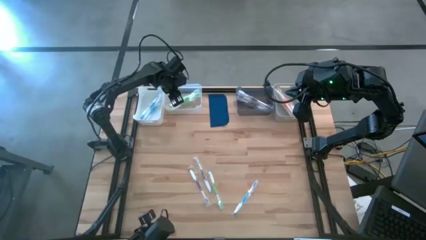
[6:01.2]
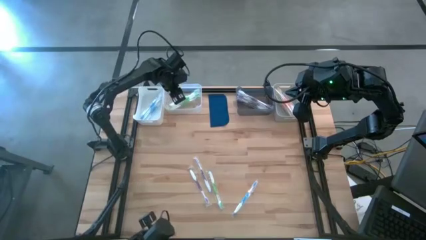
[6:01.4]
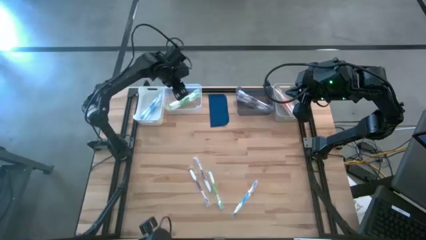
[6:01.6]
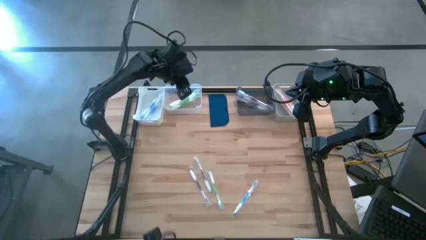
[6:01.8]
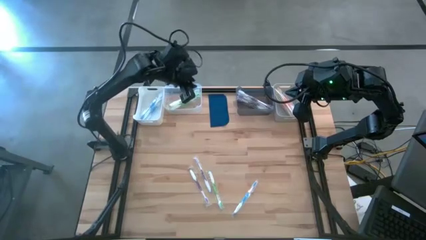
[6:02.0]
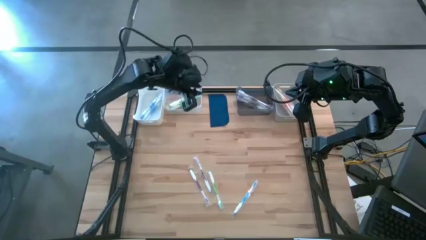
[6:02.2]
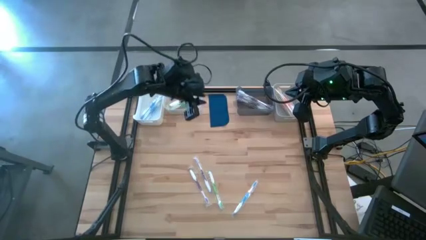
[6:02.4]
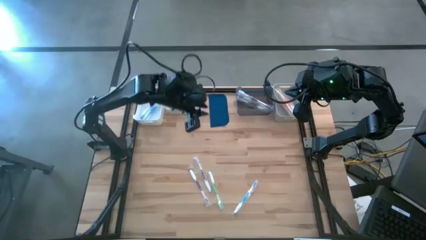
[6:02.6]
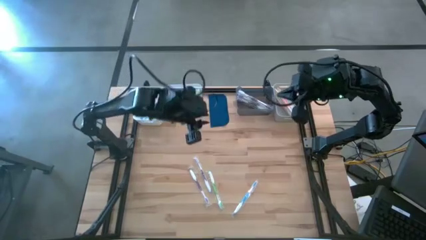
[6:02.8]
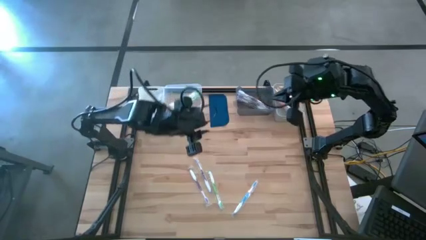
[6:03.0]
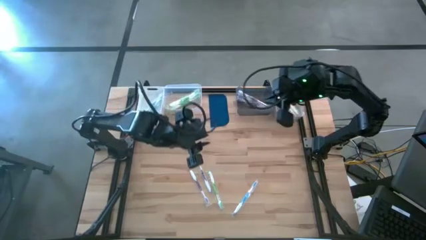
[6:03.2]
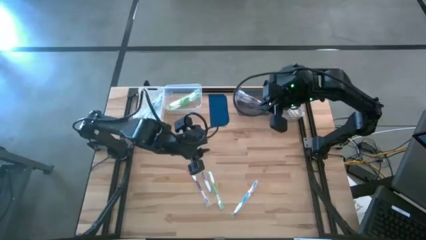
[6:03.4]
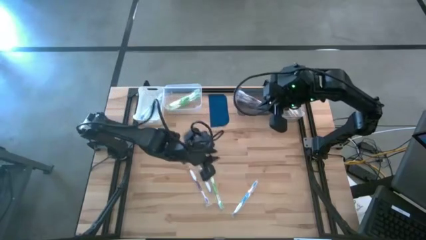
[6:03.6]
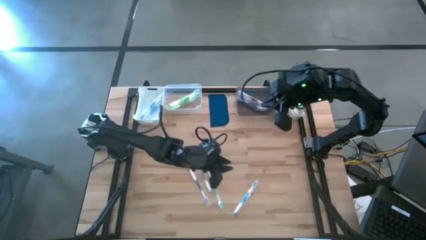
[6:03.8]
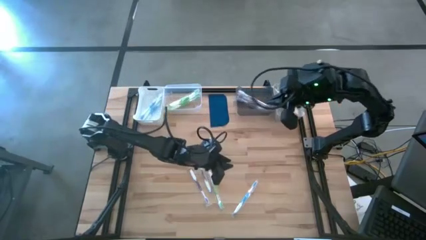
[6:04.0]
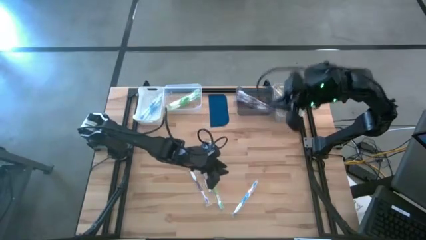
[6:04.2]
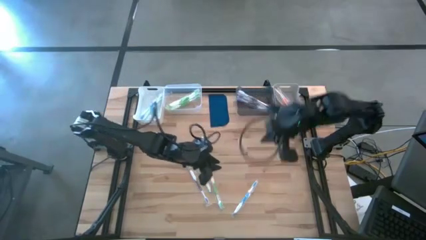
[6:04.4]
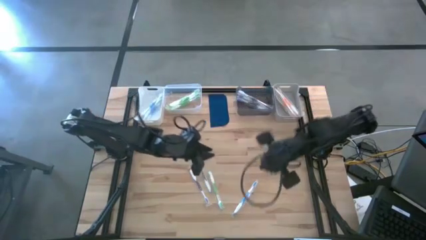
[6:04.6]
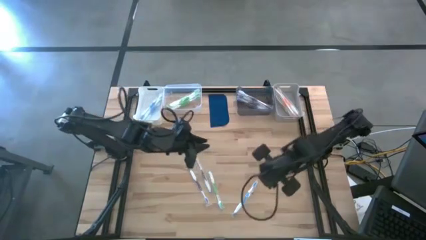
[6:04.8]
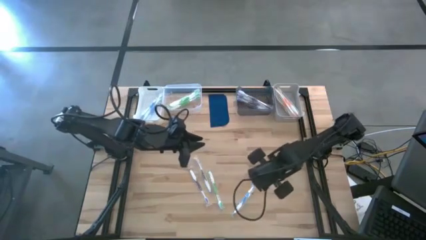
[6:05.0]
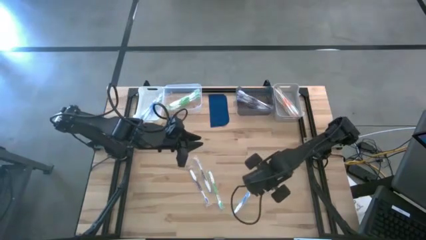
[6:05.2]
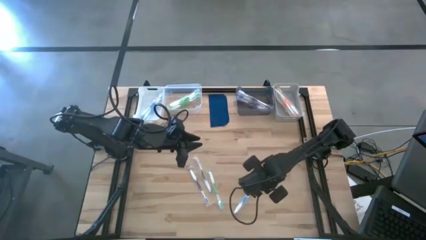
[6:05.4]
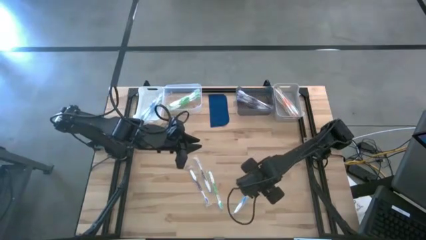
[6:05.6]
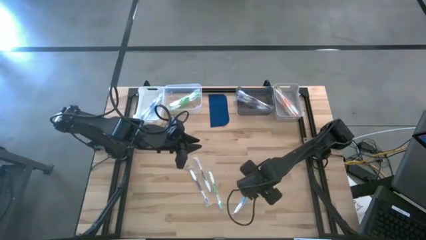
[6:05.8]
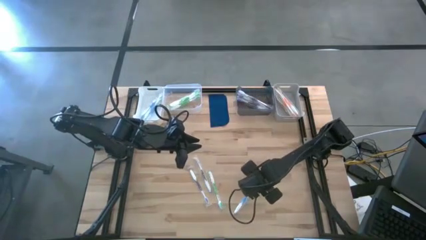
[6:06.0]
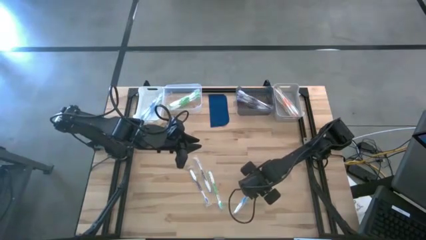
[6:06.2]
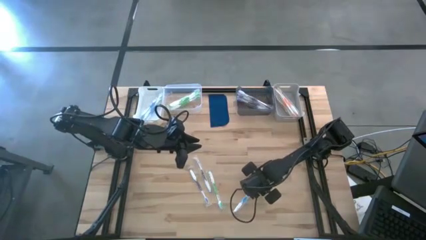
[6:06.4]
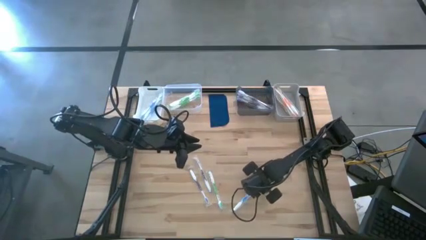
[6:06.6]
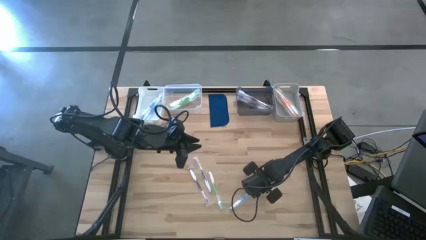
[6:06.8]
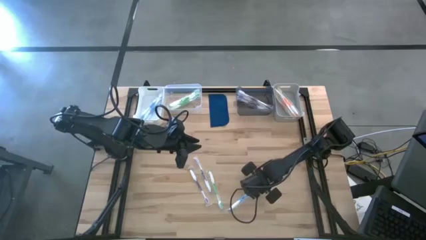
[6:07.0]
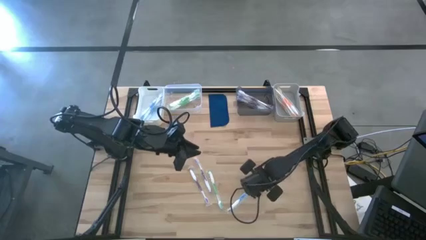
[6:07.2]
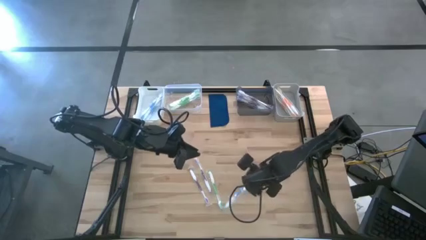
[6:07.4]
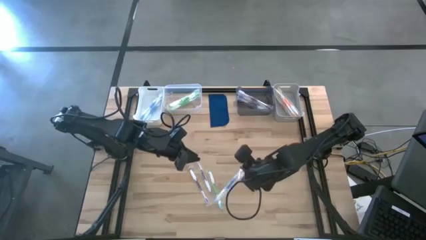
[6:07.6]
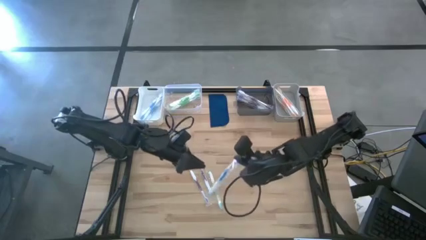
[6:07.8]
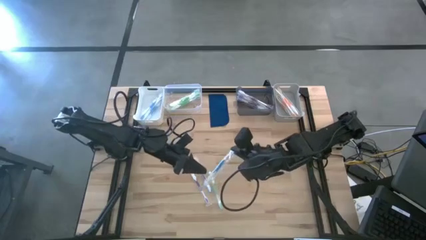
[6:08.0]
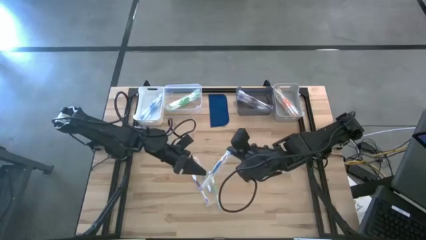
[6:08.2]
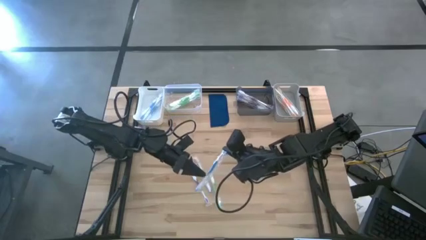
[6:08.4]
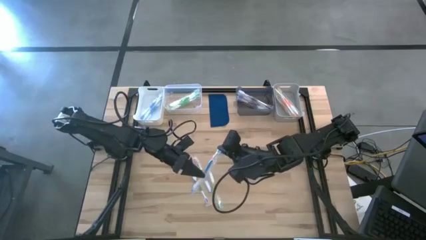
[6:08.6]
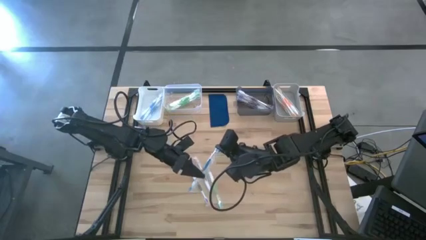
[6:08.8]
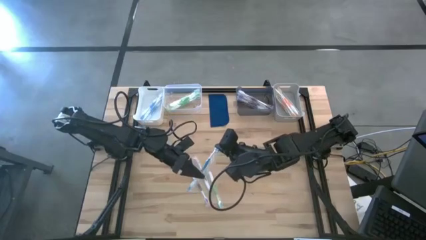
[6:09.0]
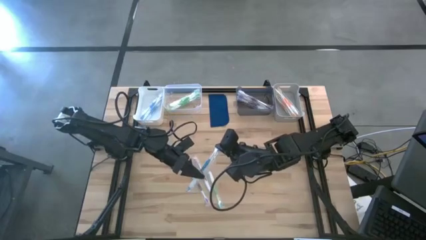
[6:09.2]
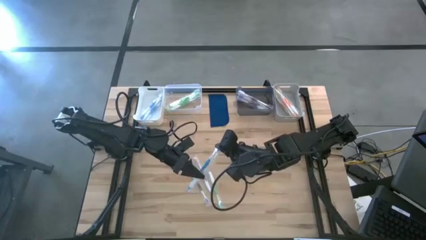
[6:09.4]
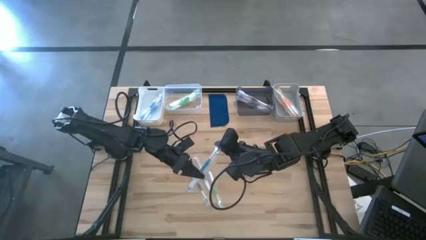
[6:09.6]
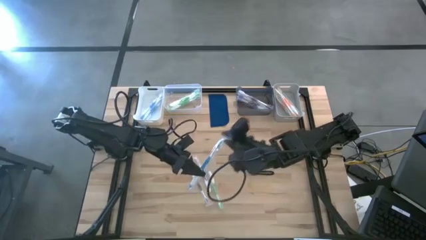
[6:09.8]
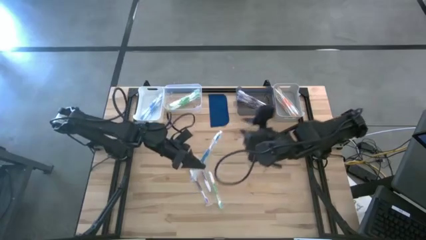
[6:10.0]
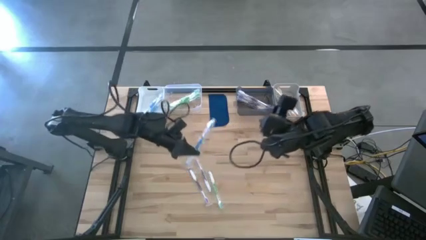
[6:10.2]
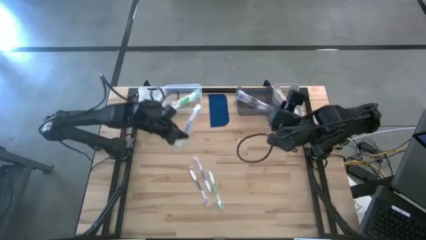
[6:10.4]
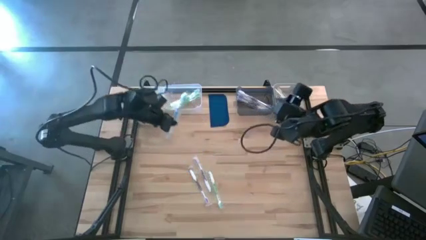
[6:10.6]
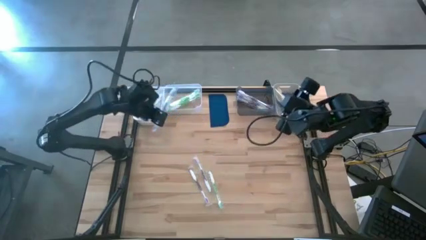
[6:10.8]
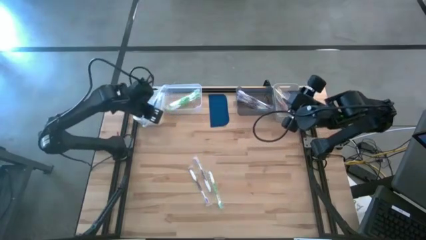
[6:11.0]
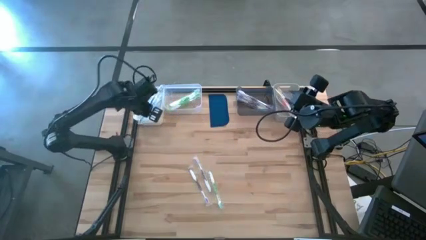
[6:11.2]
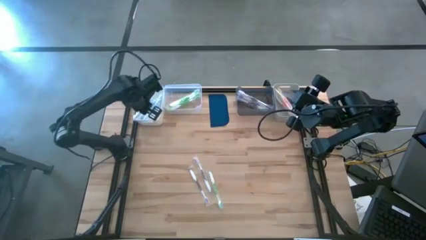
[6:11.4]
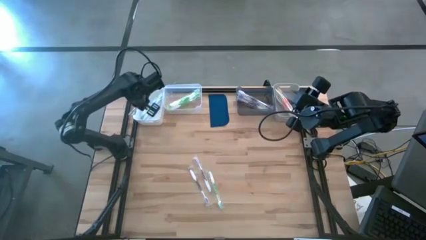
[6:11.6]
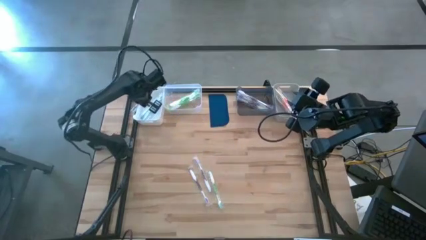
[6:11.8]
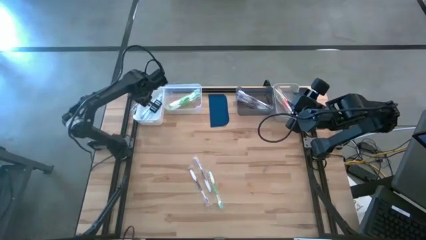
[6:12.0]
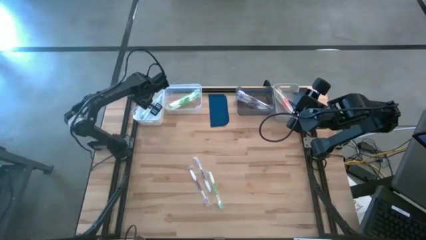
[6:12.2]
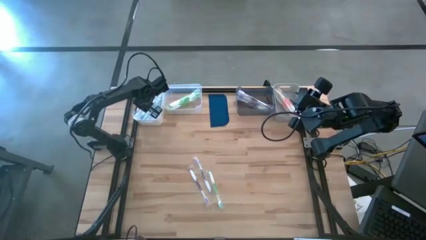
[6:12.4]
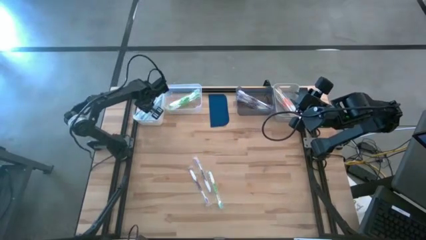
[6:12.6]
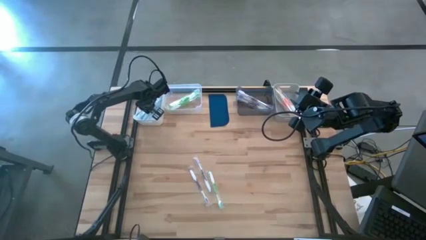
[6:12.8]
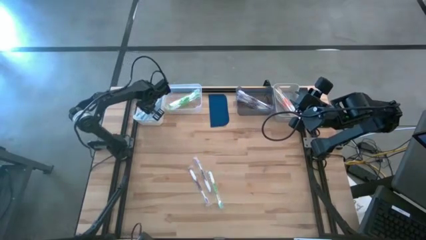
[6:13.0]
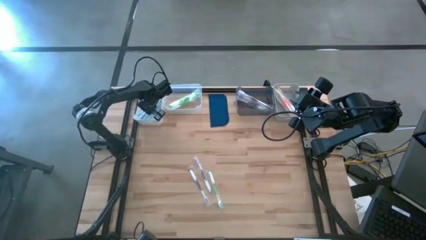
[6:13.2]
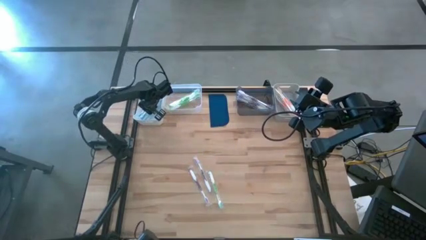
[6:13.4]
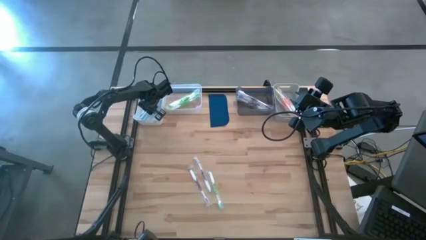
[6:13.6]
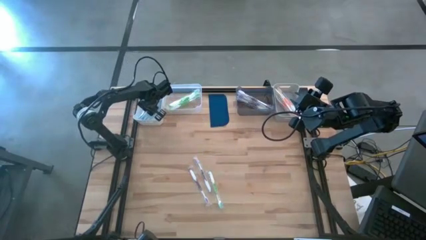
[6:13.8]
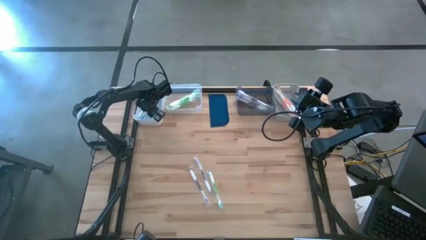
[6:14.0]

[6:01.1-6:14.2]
Task: Pick & Place Toothbrushes
Put the blue toothbrush into the white bin

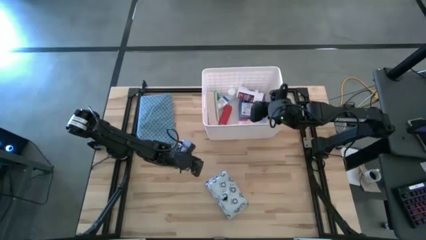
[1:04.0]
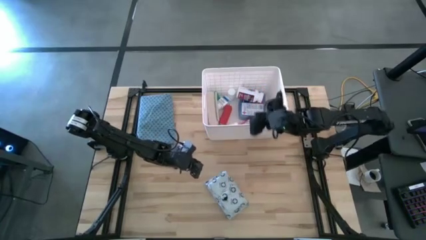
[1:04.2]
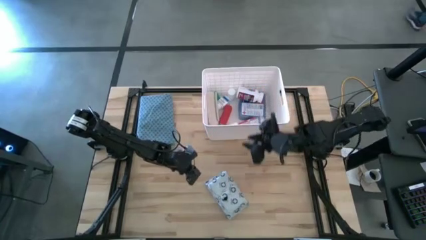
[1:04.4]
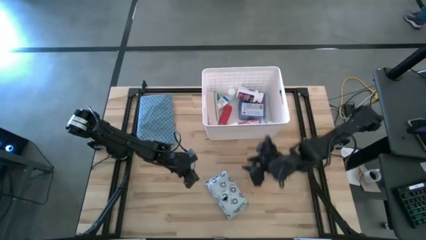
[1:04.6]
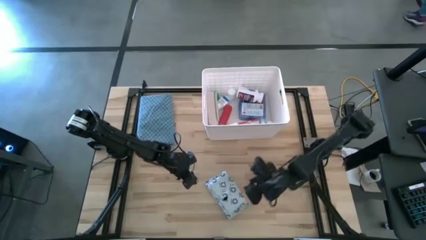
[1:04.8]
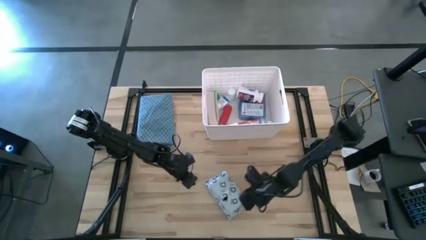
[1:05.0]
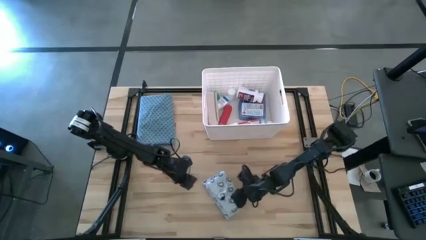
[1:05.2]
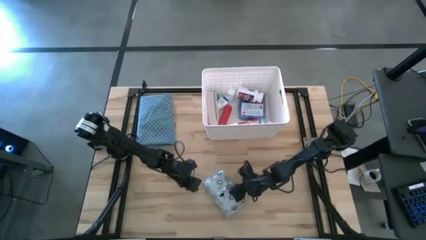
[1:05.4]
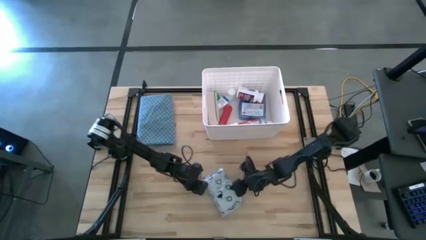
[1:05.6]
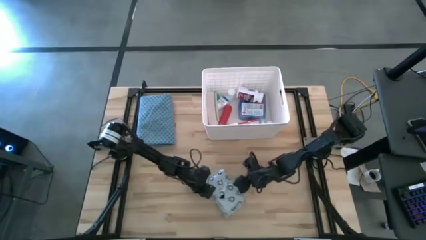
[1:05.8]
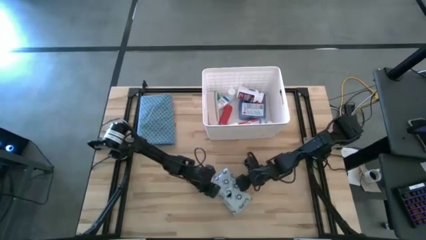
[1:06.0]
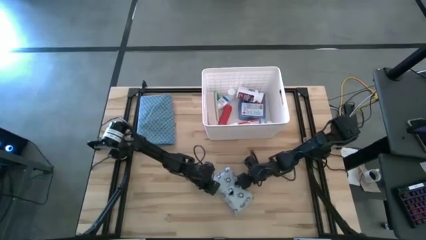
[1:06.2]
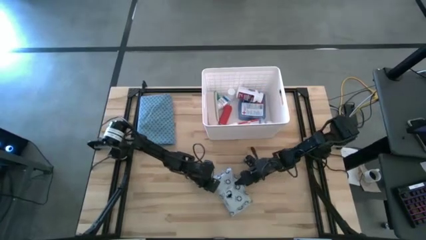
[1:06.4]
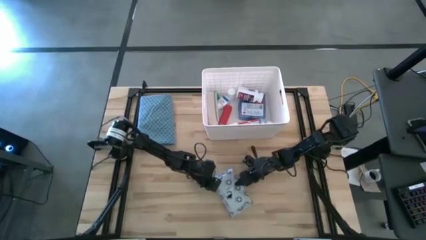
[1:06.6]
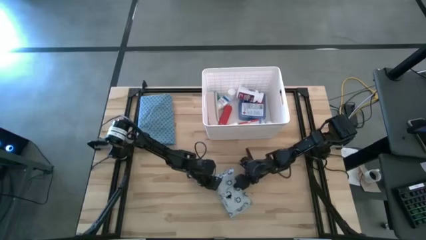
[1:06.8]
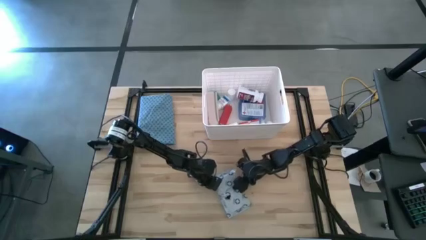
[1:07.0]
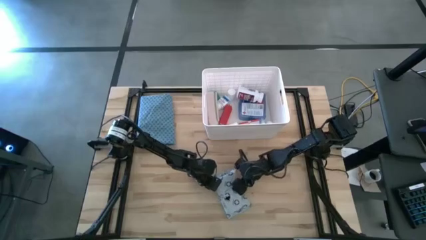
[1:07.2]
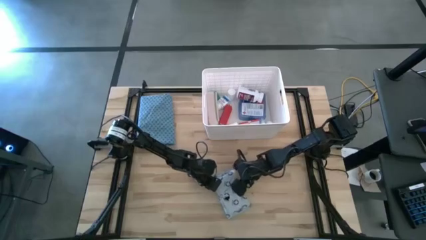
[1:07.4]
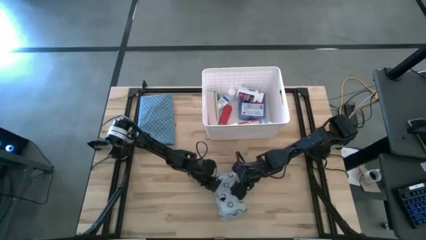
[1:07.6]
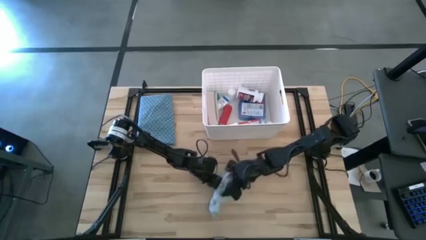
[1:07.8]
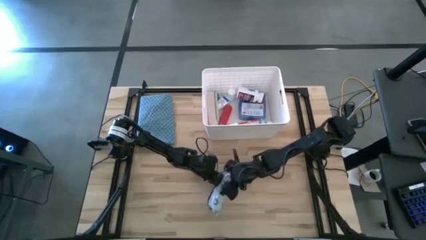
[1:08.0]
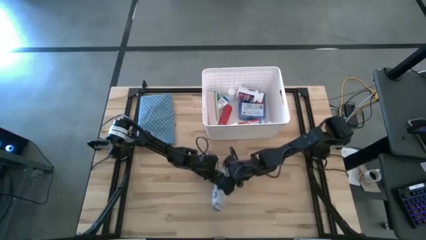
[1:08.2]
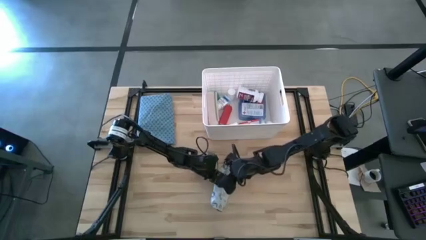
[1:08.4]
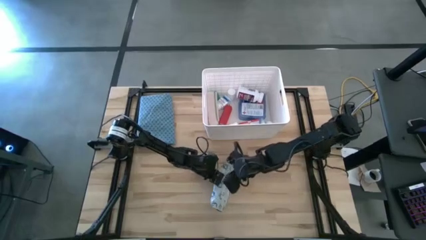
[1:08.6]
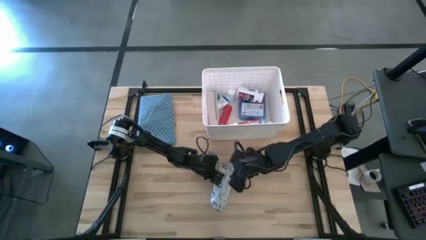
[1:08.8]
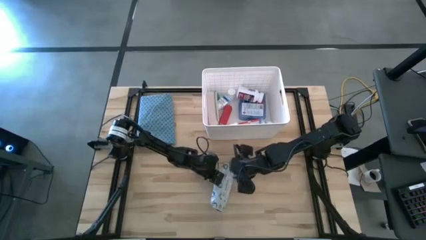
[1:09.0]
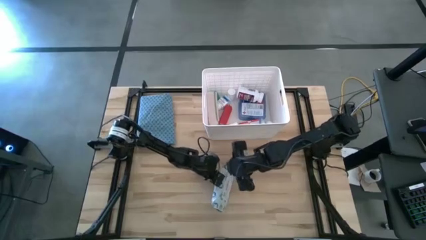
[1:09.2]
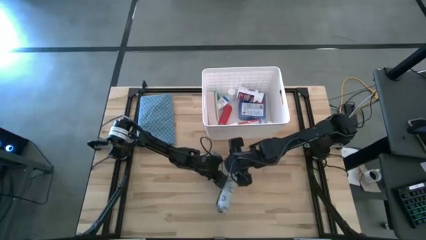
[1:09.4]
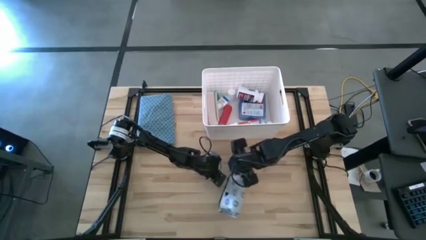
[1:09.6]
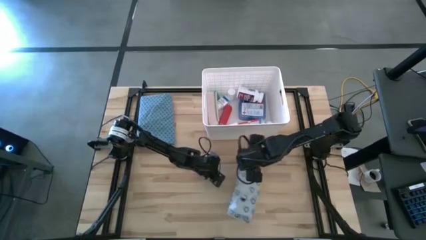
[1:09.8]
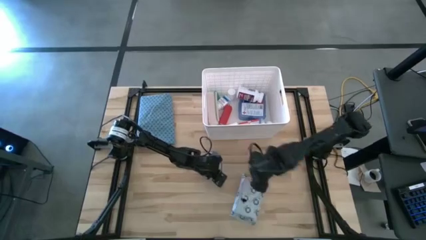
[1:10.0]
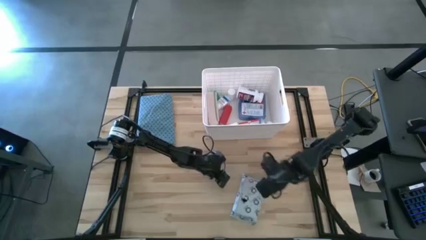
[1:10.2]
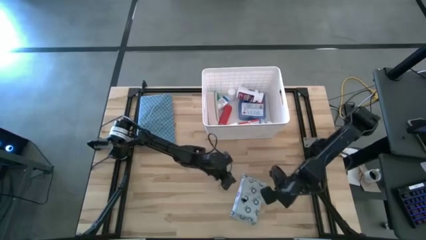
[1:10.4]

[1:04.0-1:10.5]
Task: Pick & place medical supplies in basket/bin
Put the white mailer bag into the white bin
